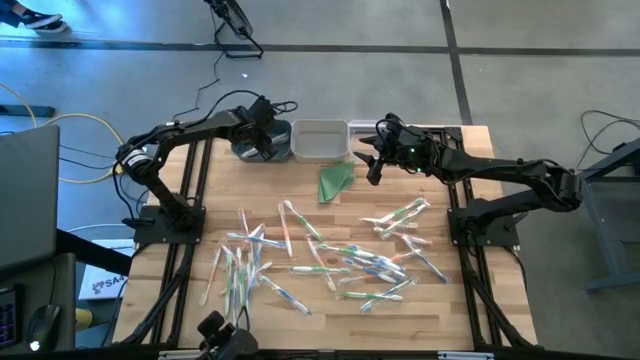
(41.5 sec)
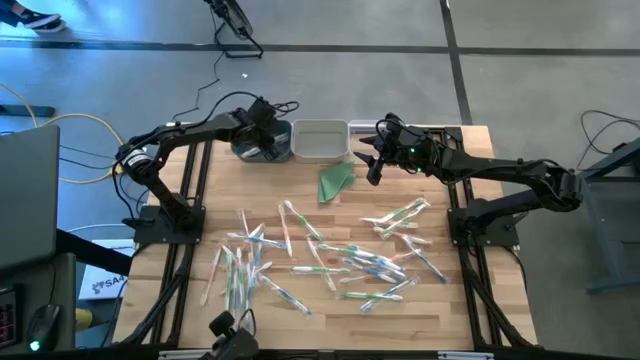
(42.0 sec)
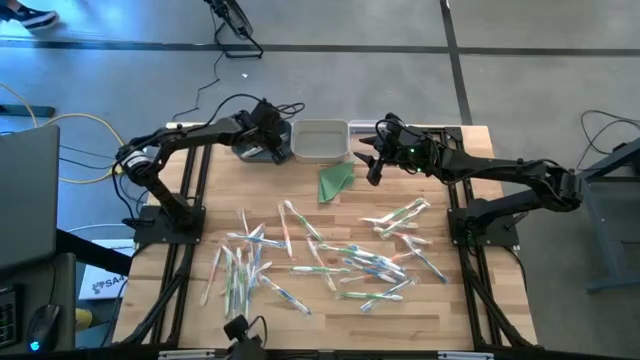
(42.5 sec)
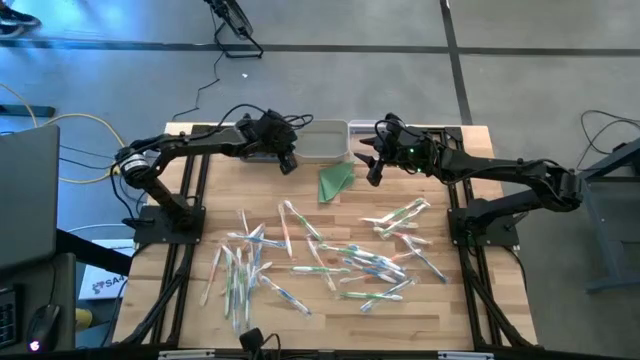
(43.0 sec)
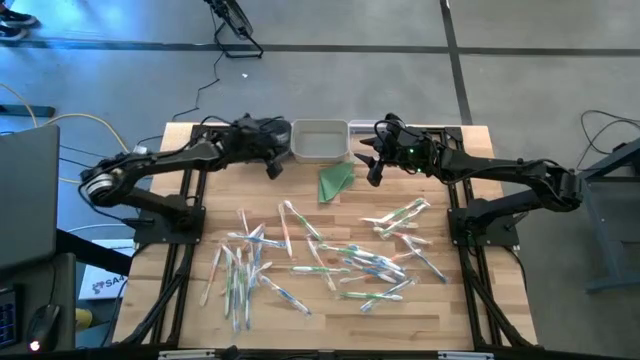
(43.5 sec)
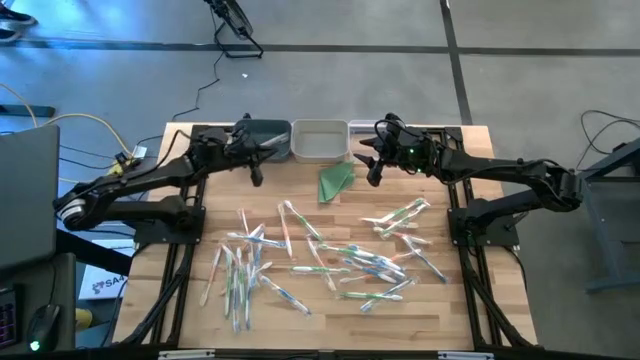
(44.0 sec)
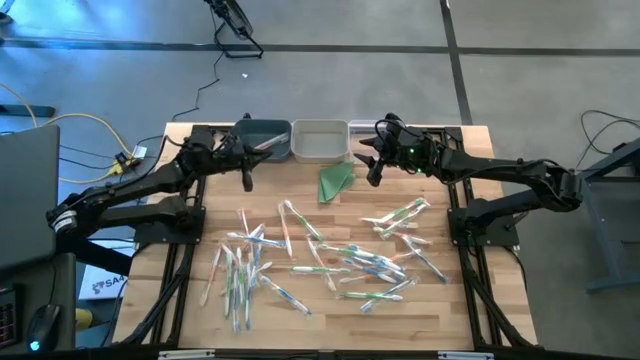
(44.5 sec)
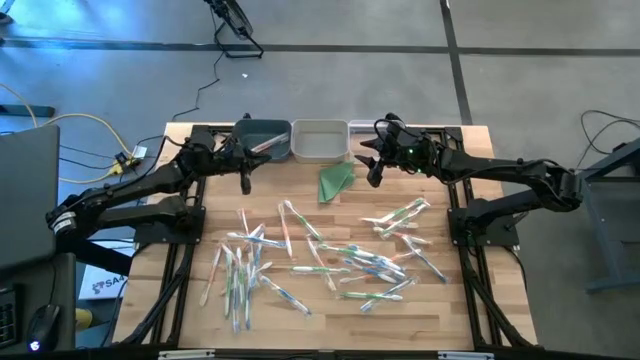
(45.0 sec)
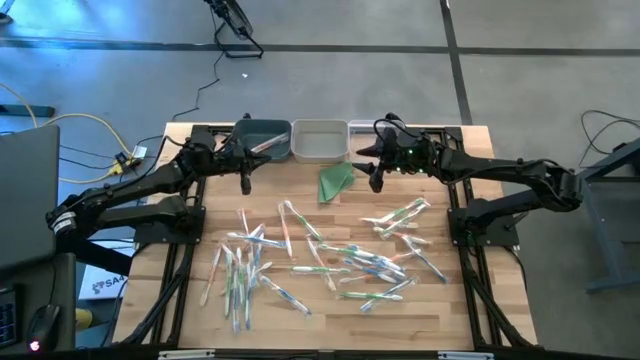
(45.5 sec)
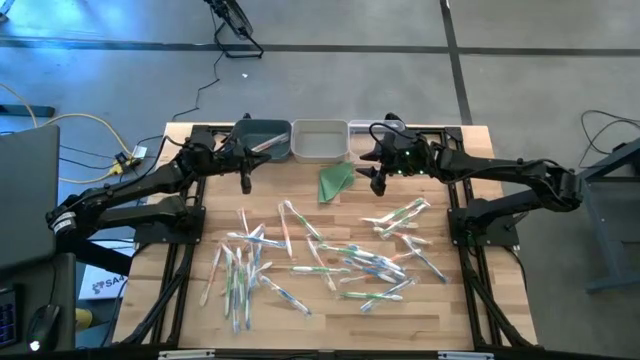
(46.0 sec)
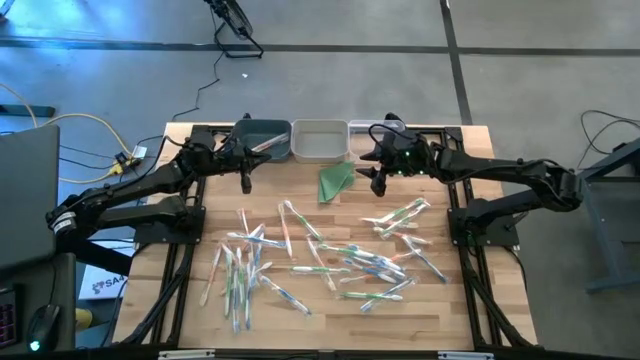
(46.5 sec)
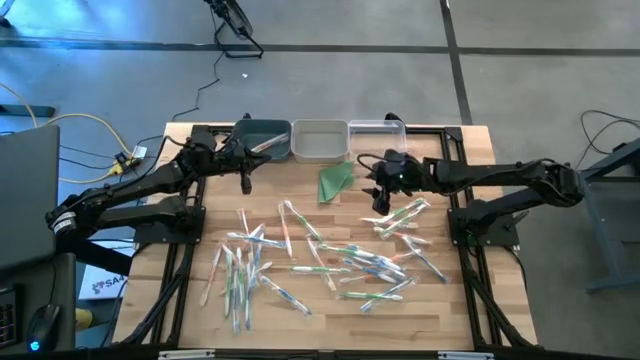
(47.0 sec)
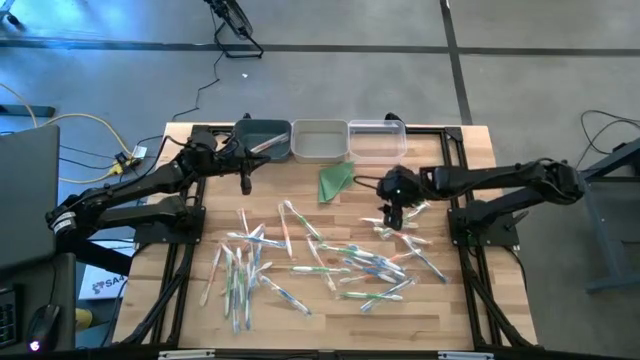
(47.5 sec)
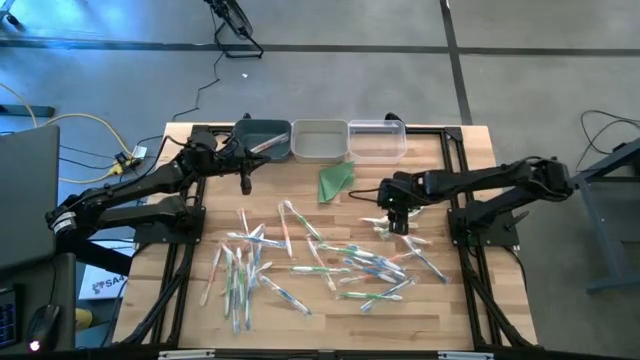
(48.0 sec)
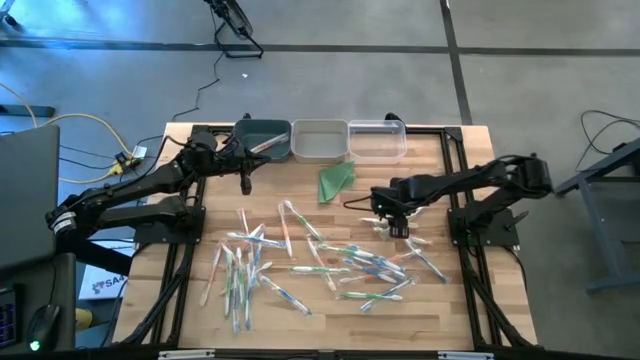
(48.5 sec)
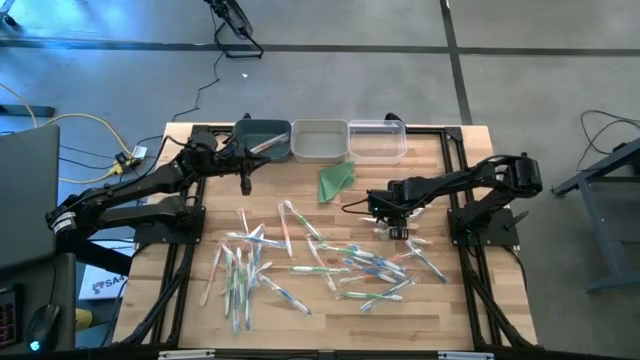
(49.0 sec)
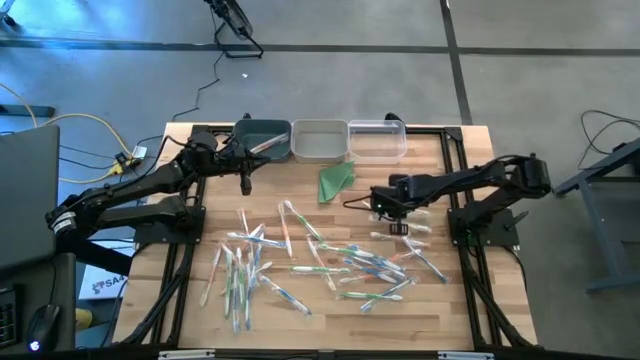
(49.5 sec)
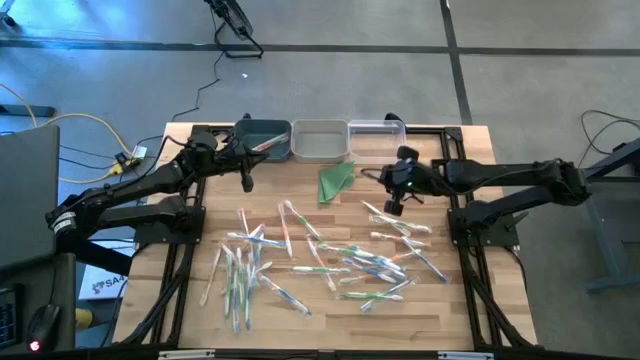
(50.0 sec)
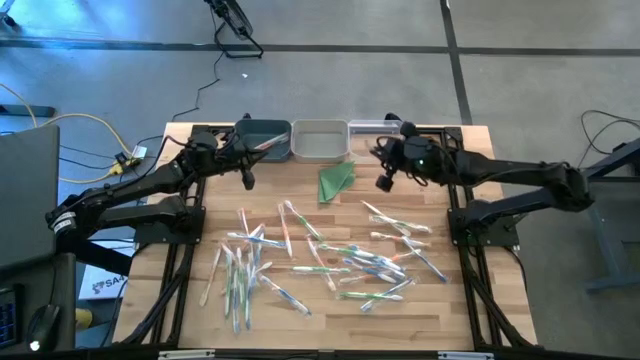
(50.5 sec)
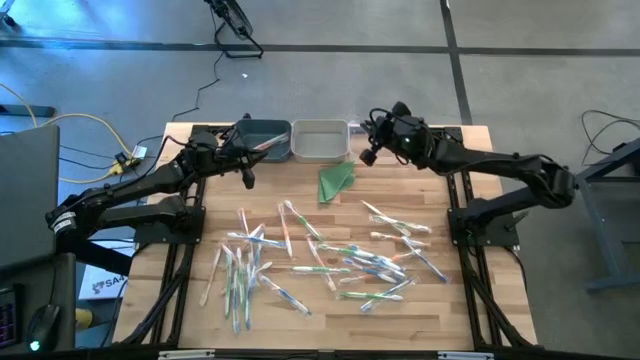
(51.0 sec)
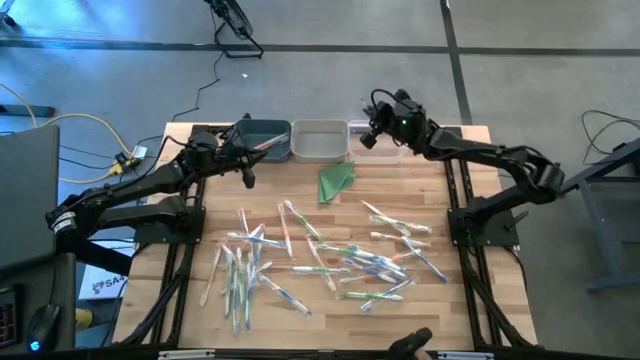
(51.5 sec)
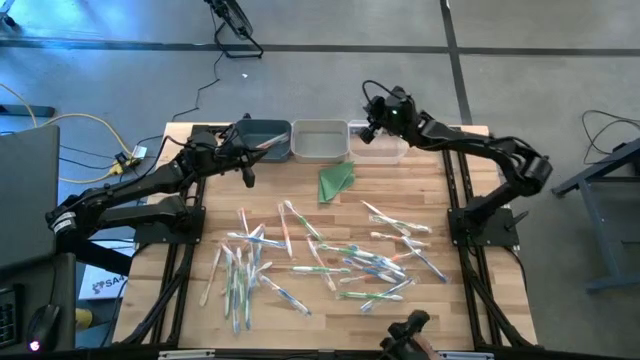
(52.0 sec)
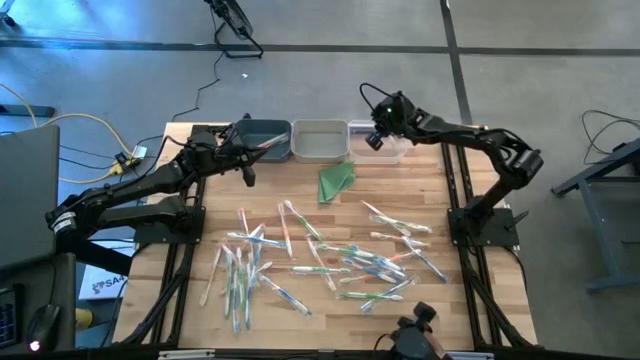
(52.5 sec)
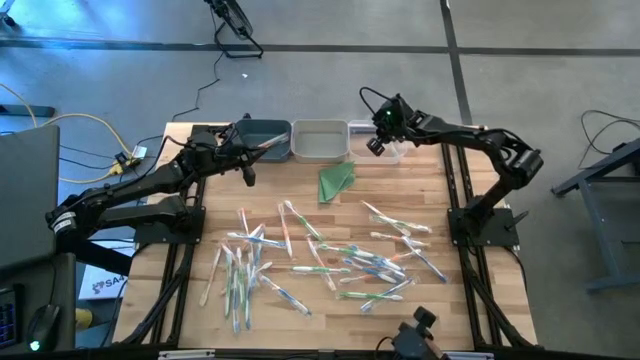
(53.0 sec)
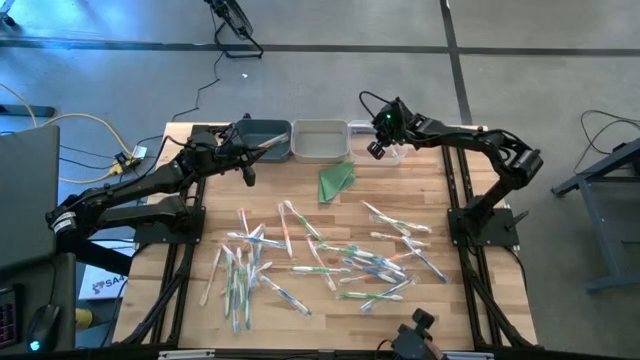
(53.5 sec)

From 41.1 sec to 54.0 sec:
Task: Pick & Place Toothbrushes
Put the green toothbrush into the transparent bin

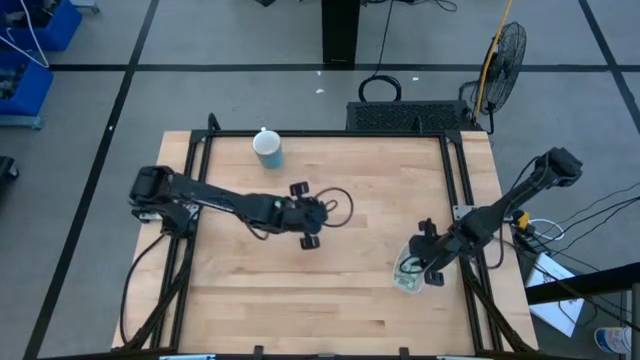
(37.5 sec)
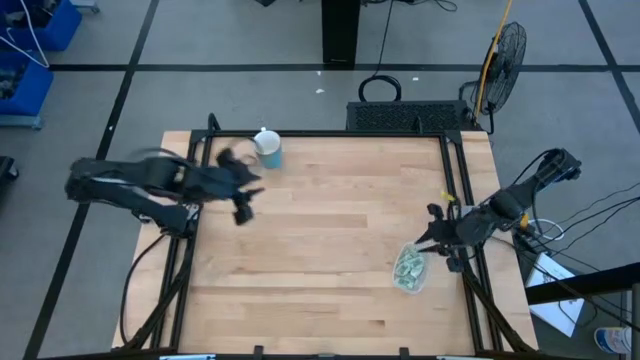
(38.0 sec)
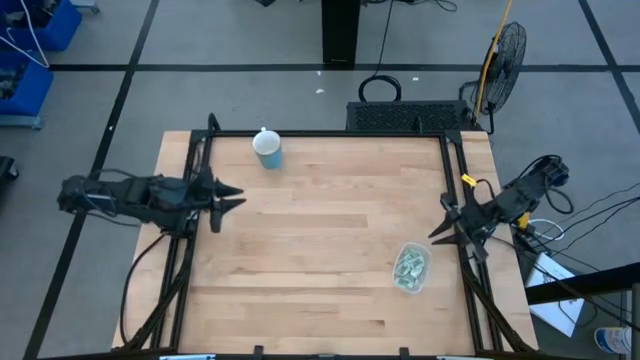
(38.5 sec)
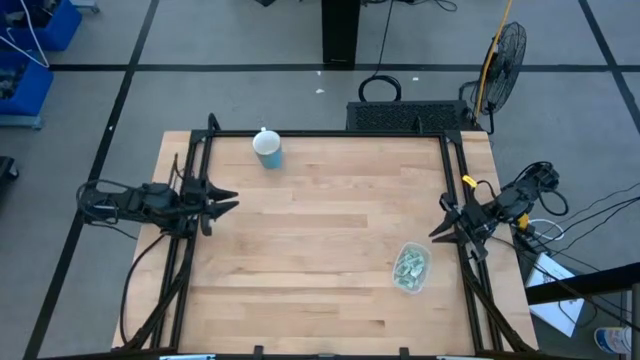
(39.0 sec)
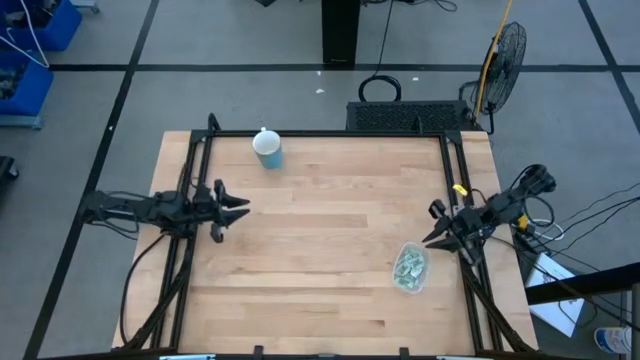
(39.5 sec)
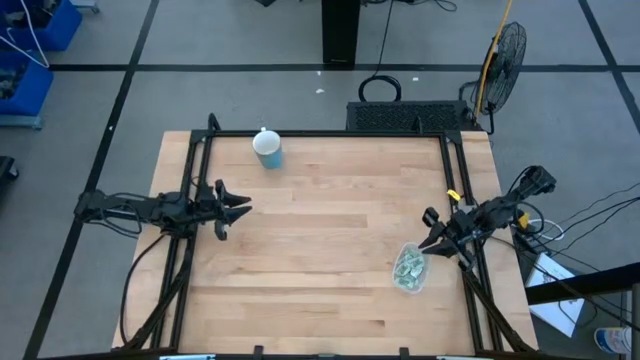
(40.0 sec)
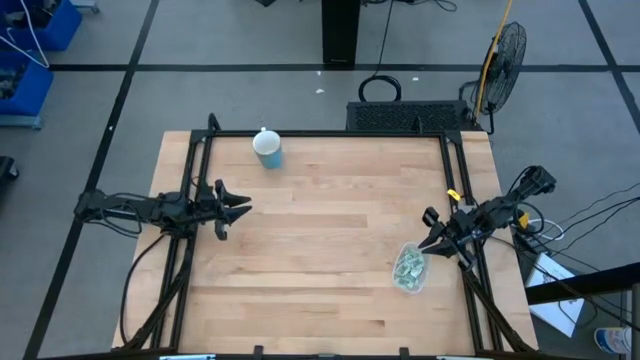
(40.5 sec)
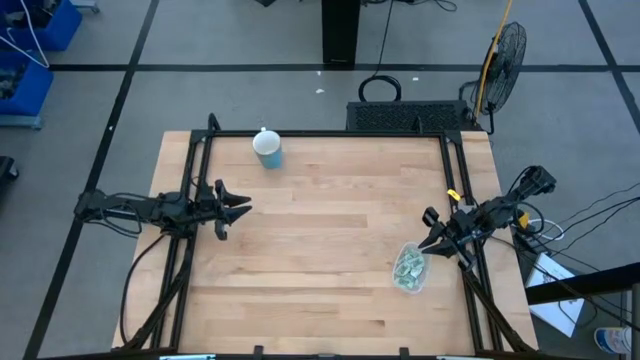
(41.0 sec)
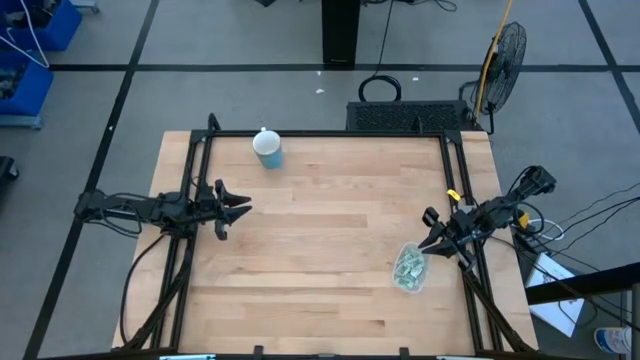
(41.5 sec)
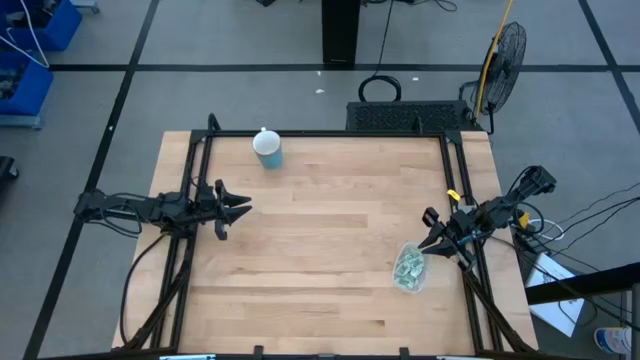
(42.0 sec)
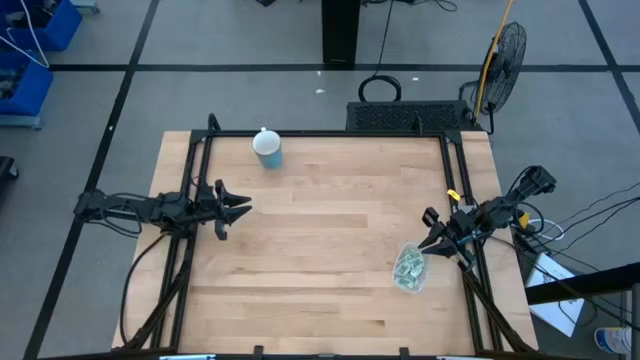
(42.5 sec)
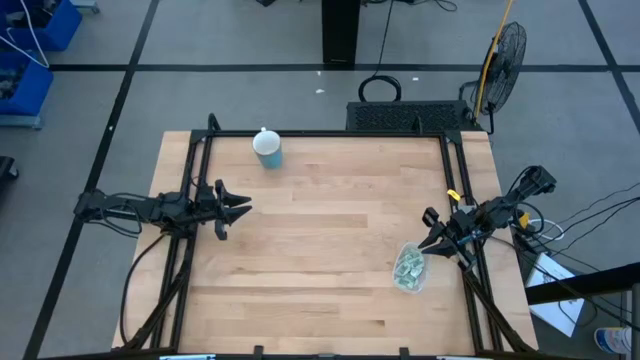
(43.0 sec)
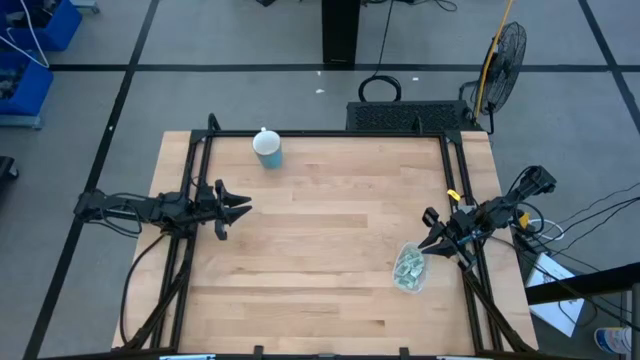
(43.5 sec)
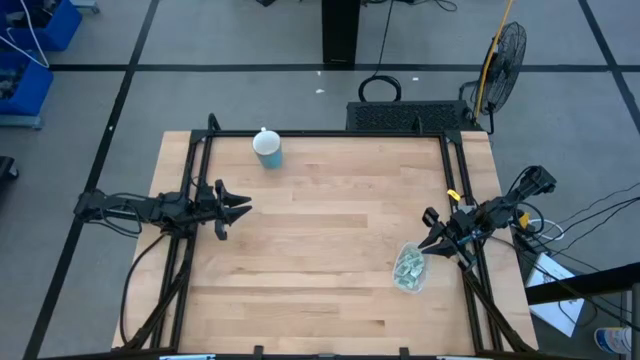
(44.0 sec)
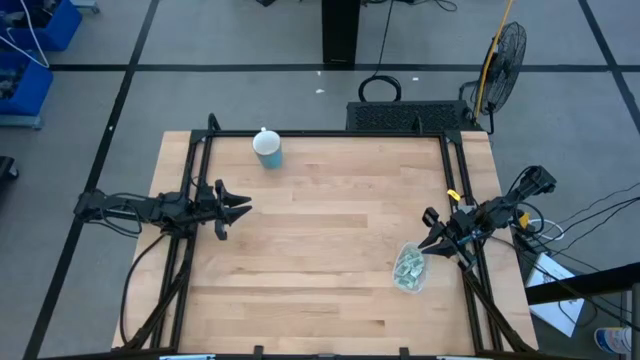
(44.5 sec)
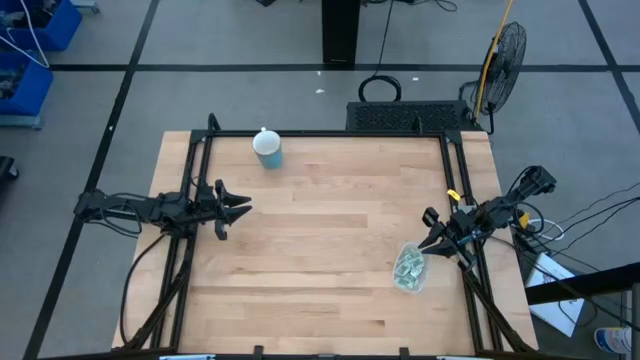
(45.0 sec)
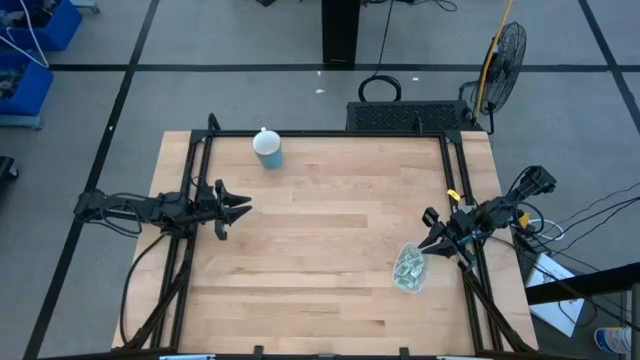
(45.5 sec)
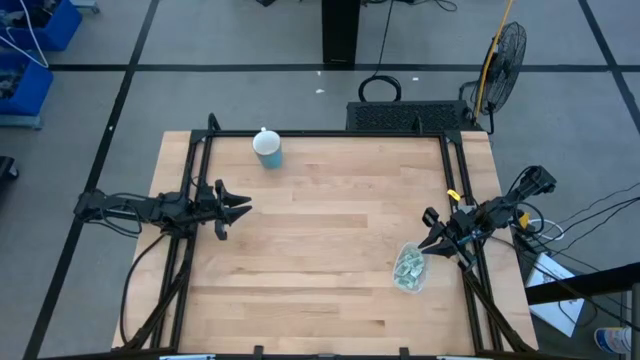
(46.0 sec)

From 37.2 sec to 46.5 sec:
Task: Pick and place Stevia / Truvia into bins
Return to Home Position
